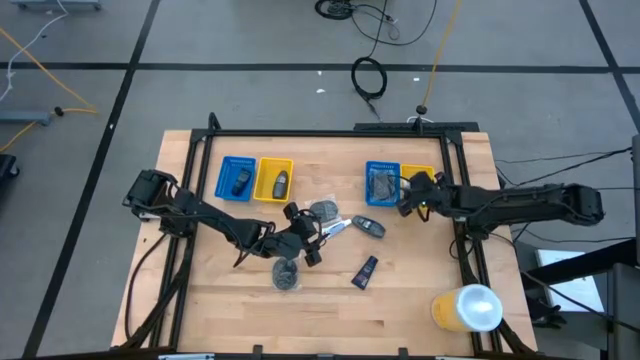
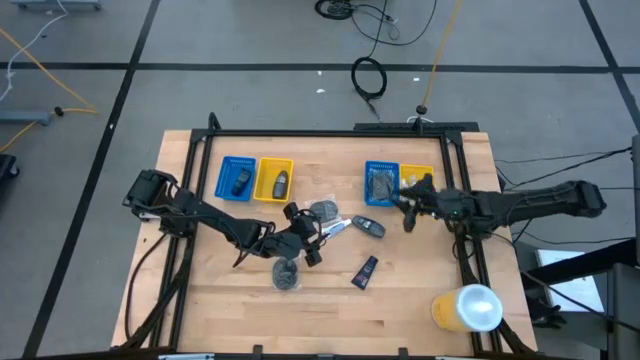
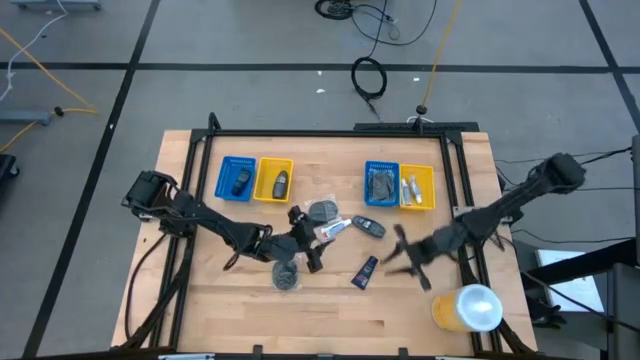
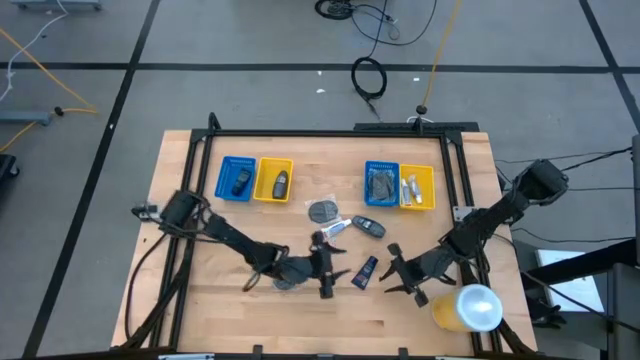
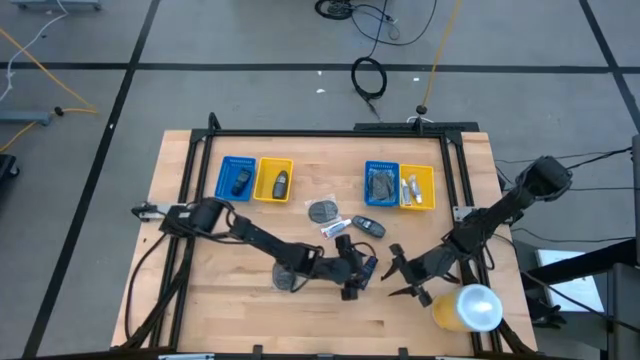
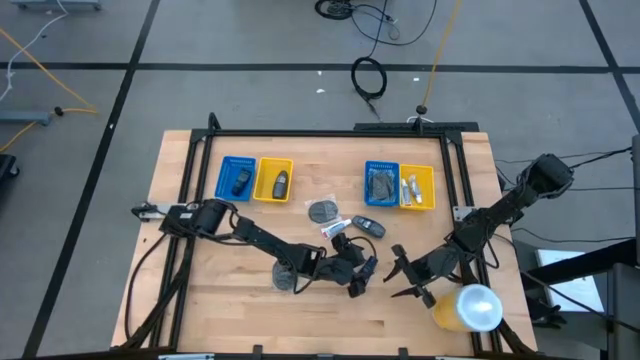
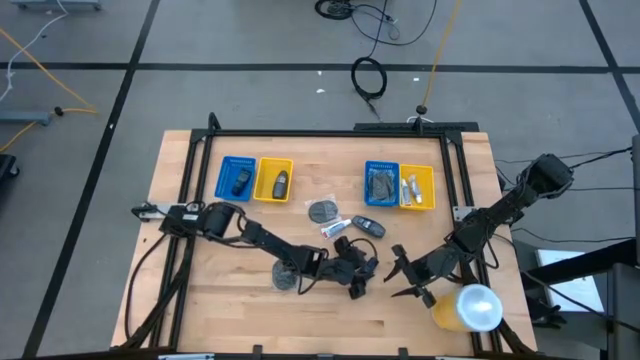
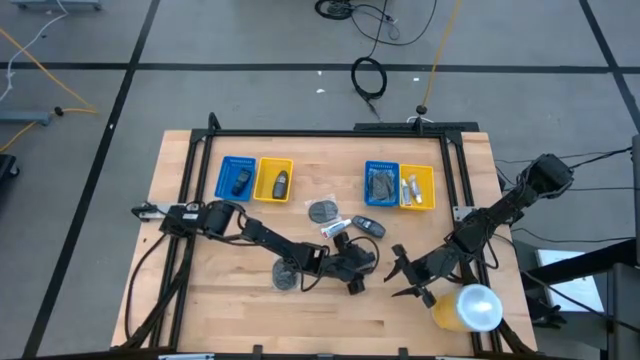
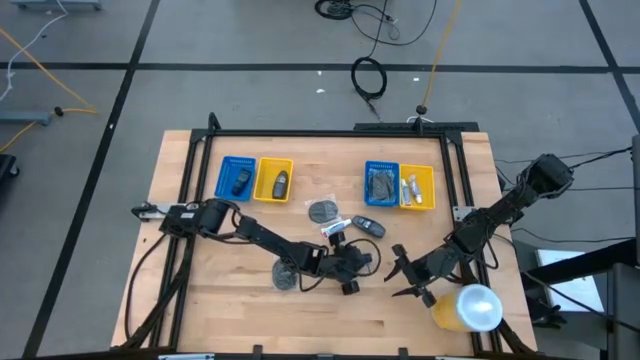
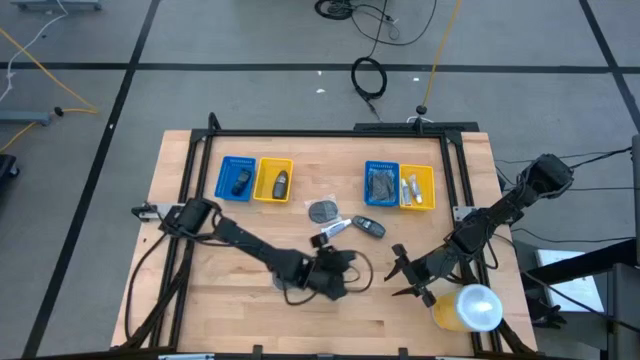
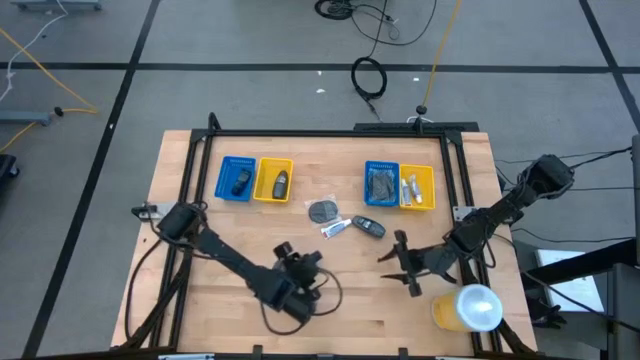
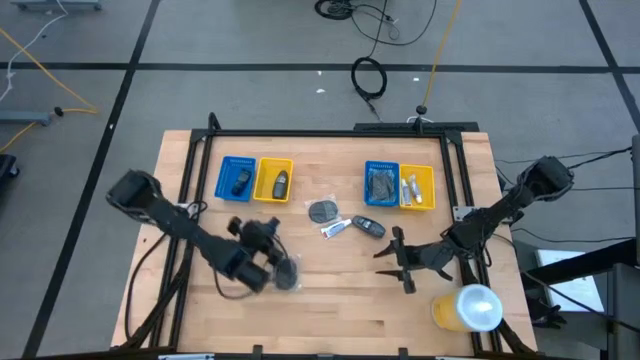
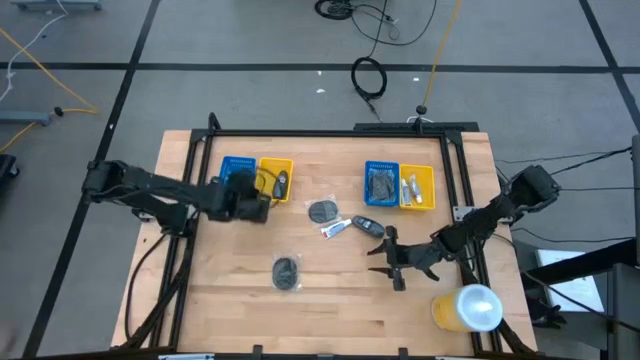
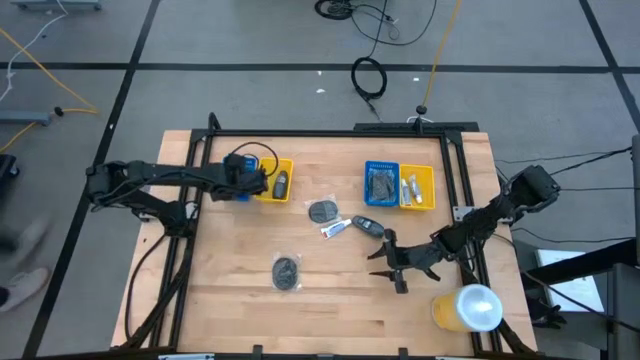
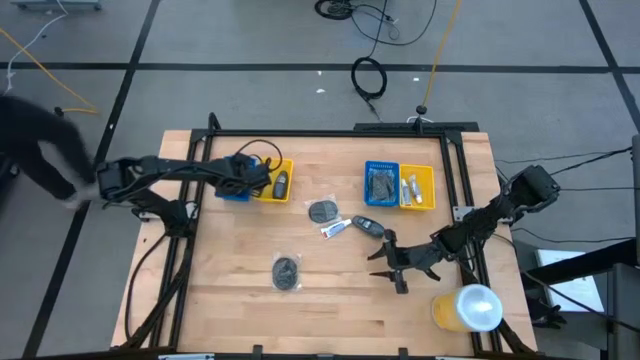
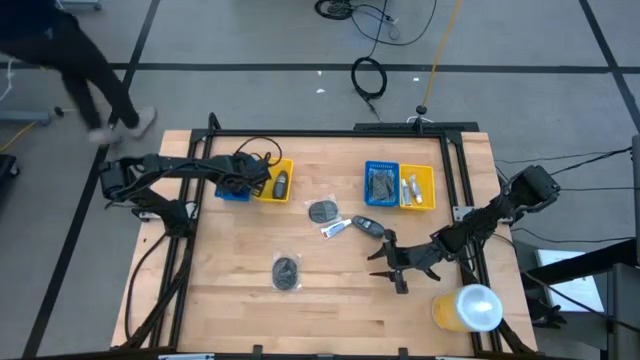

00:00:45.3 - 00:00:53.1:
Task: Pick & Place Travel size toiletries
Put the blue shave cream into the left blue bin

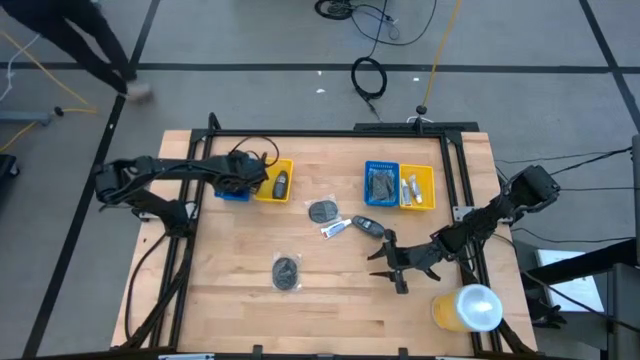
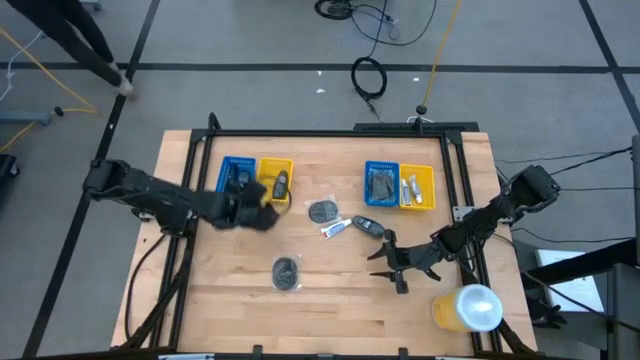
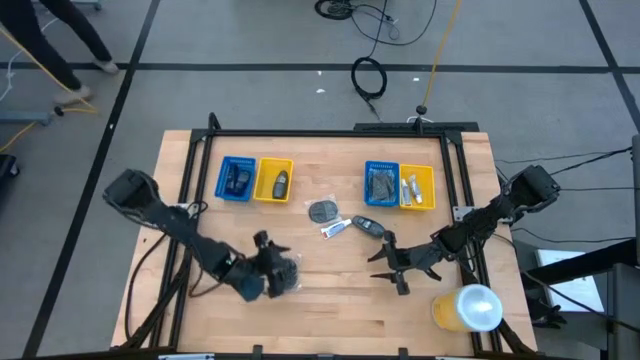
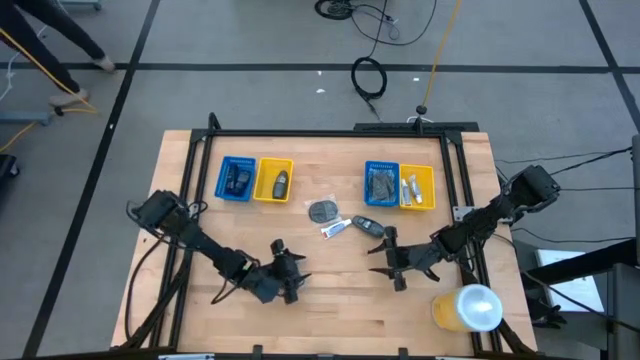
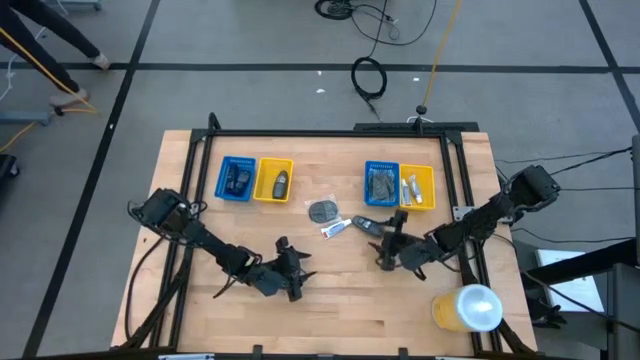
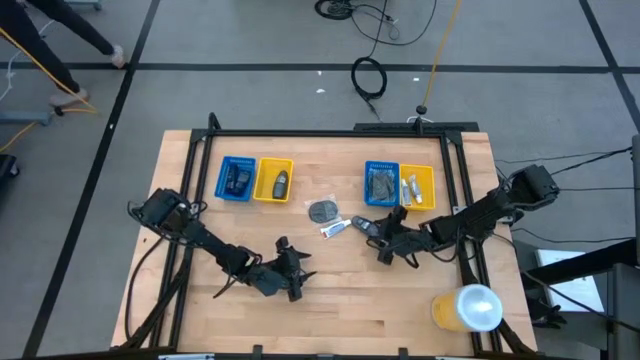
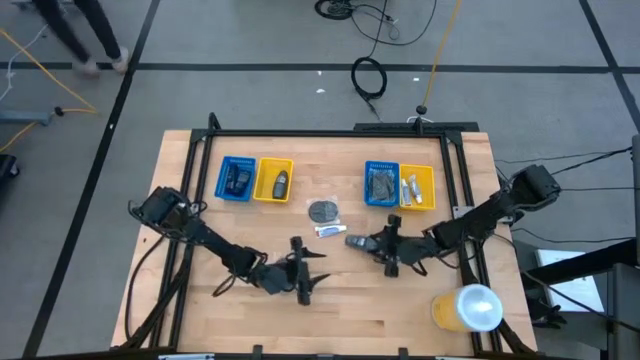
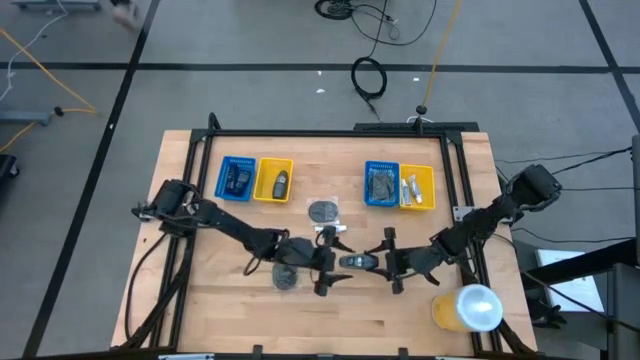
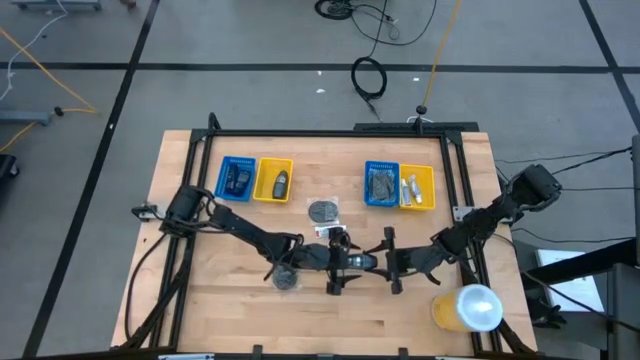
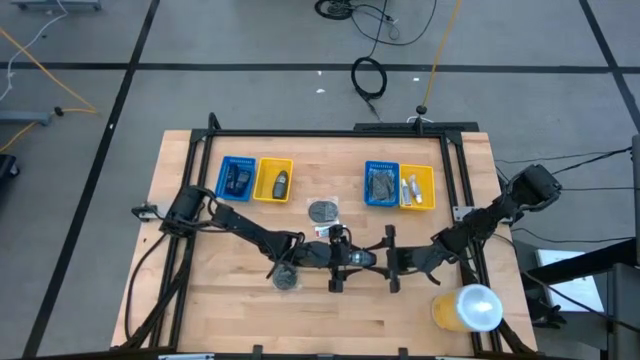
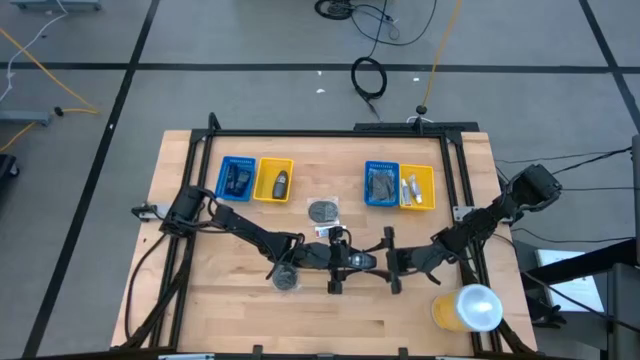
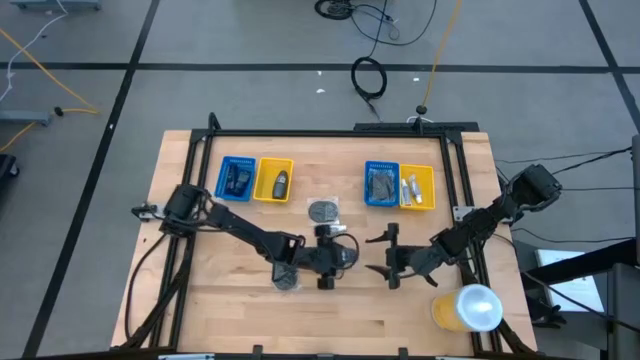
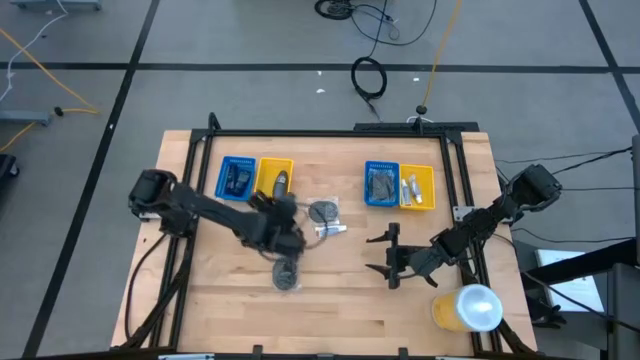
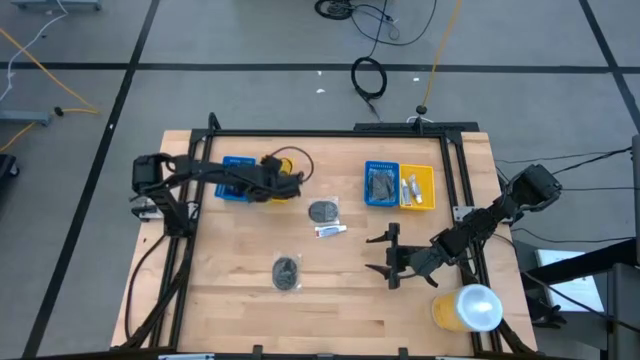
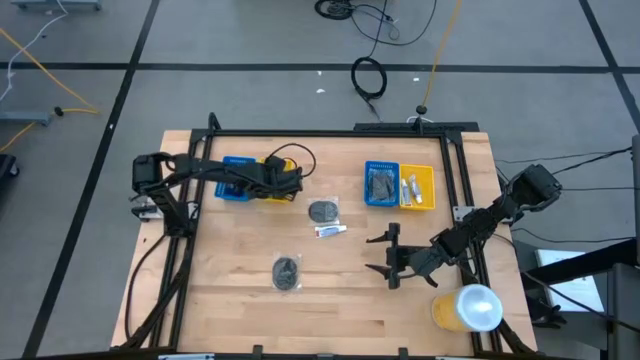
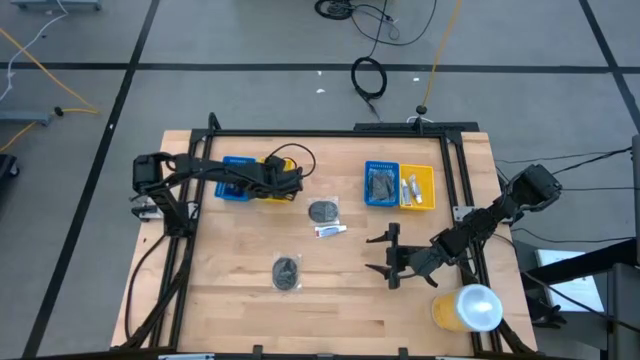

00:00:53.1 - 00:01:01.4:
Put the gray deodorant into the left yellow bin

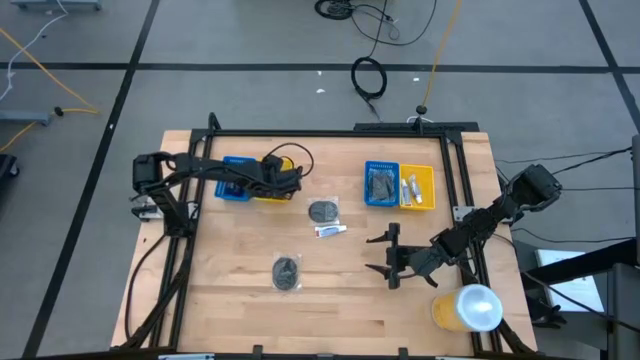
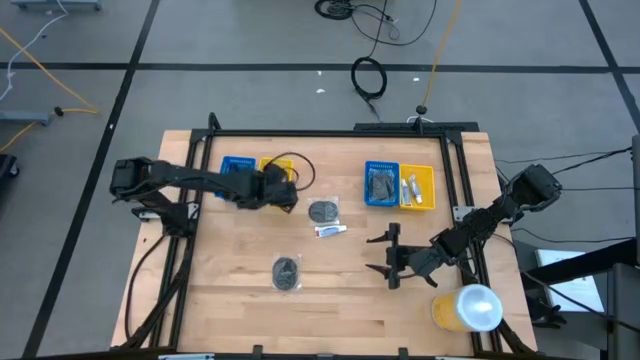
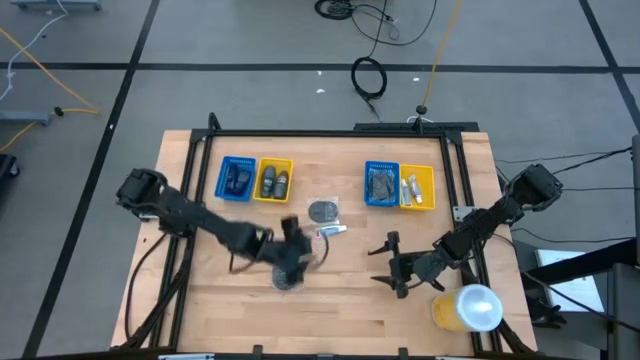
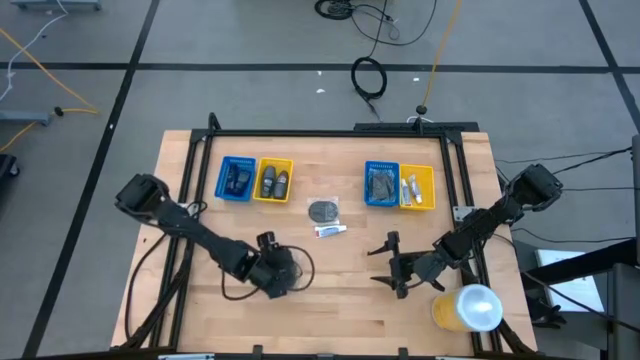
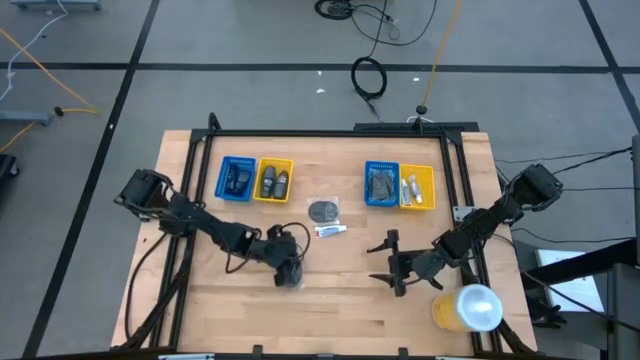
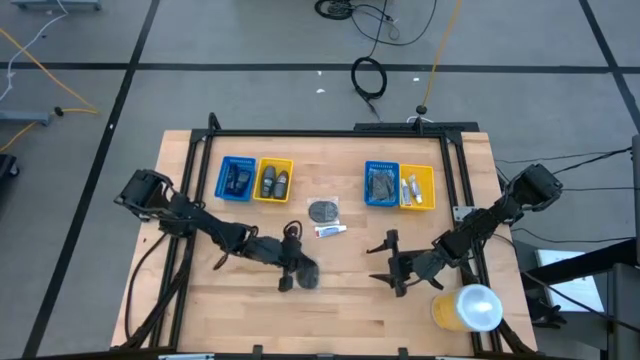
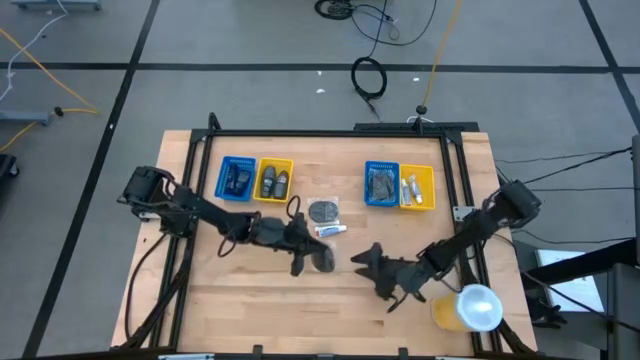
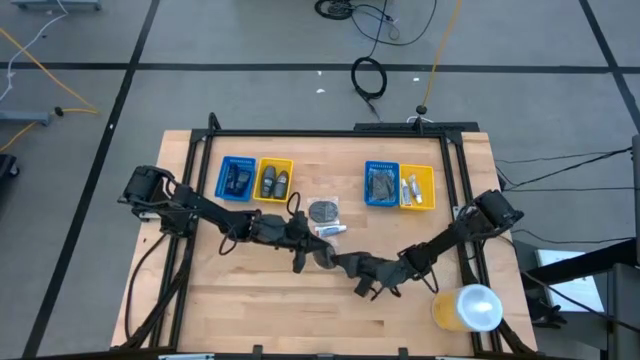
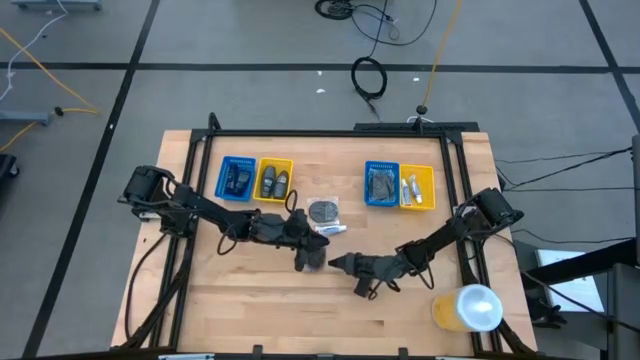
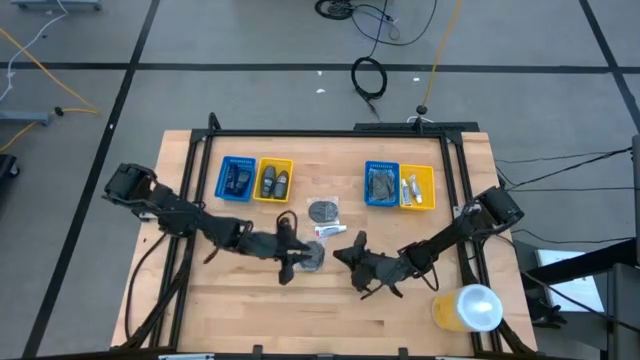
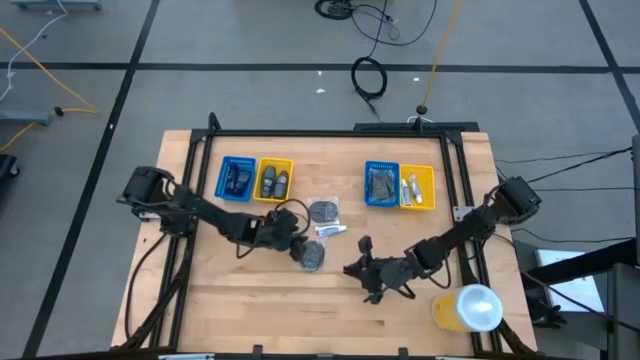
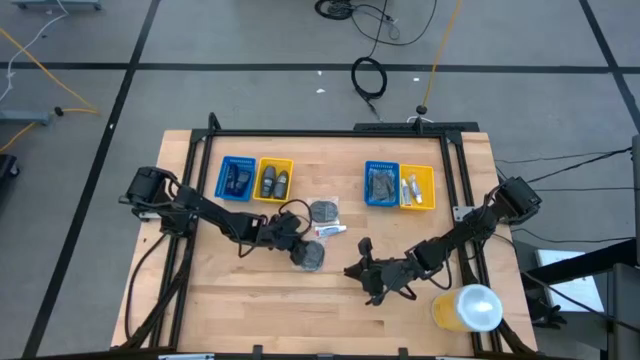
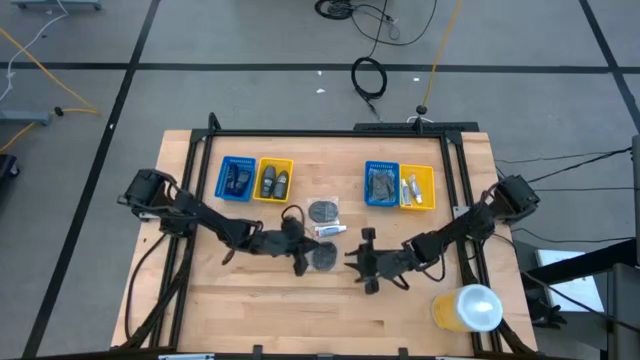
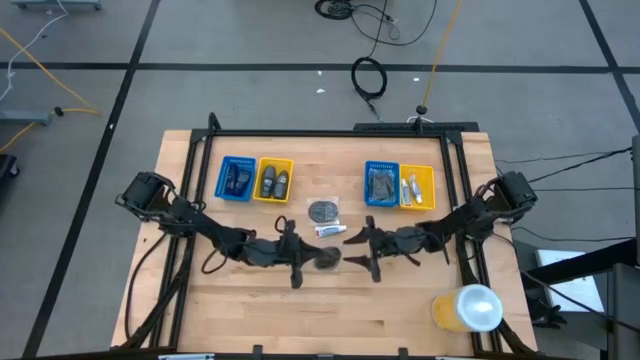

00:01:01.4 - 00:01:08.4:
Put the black hairbrush into the right blue bin
